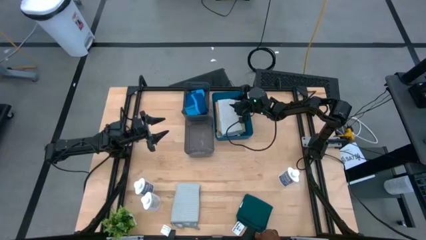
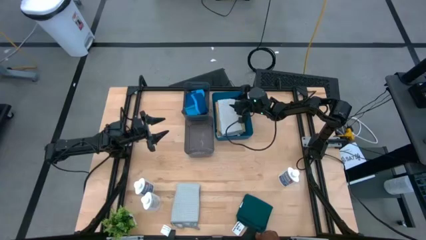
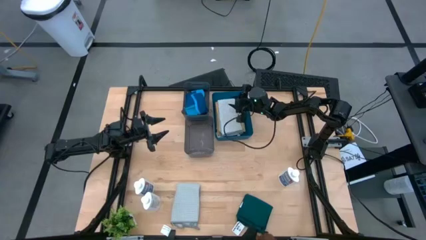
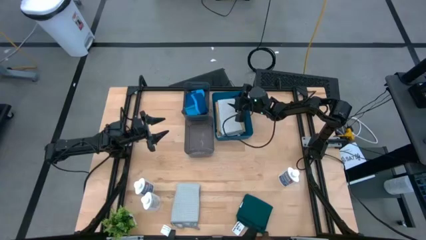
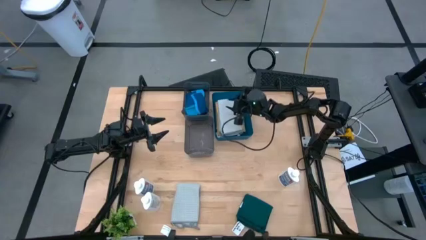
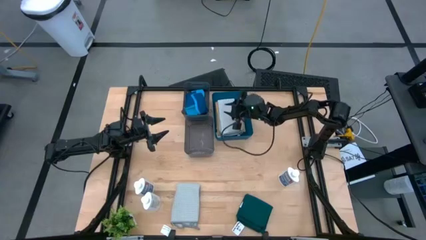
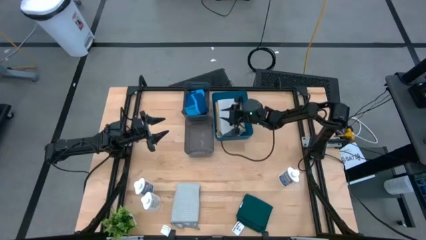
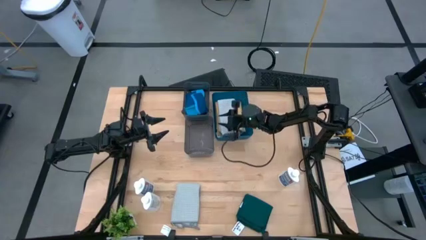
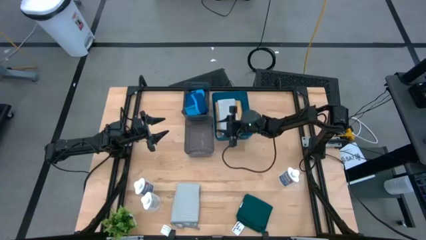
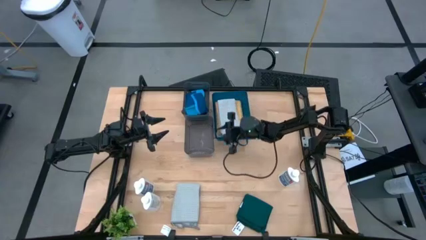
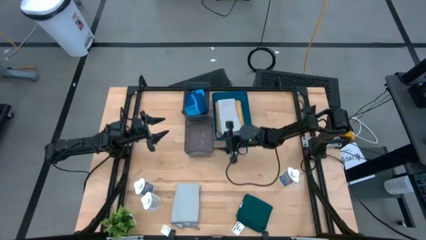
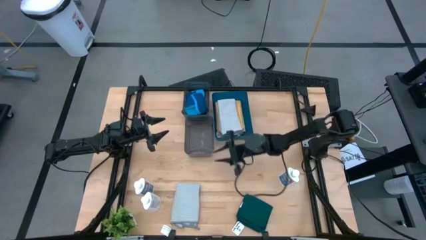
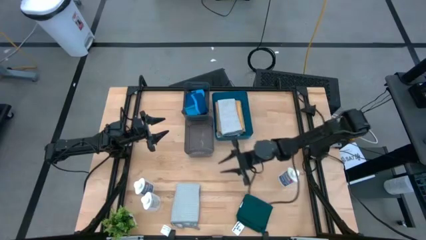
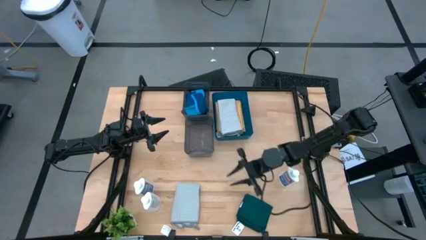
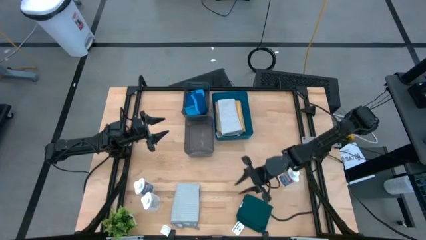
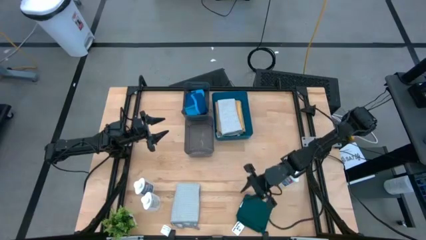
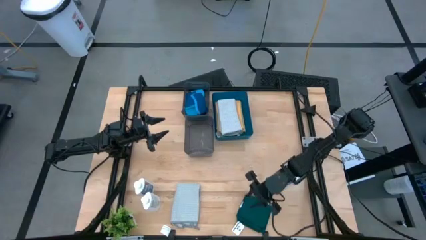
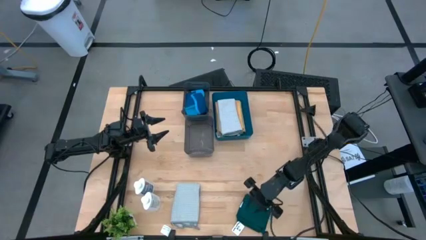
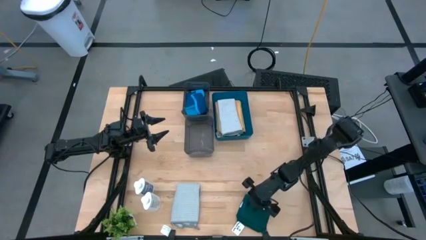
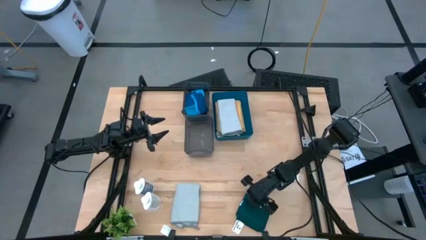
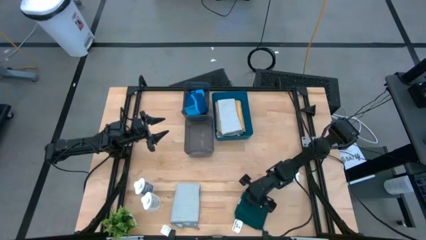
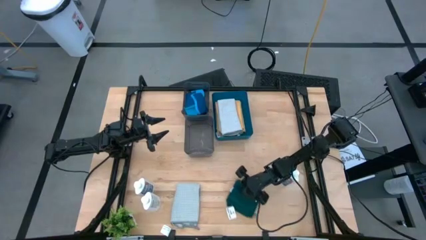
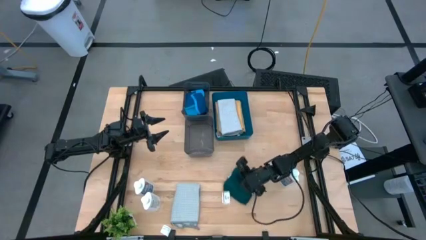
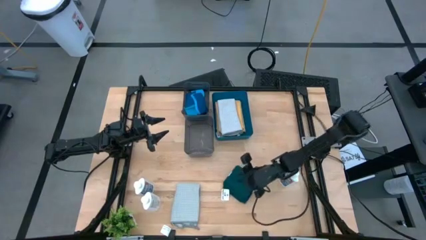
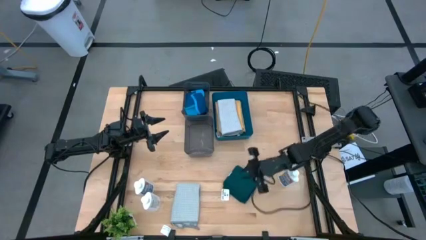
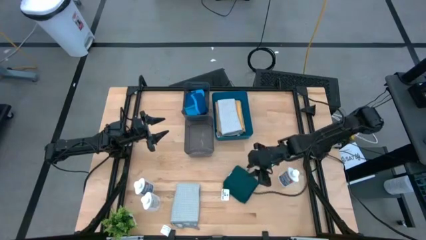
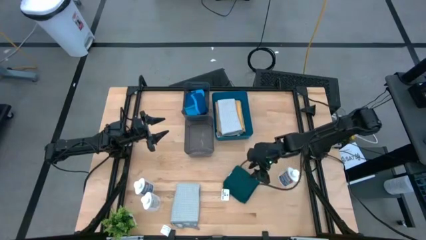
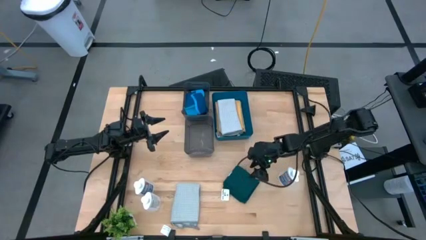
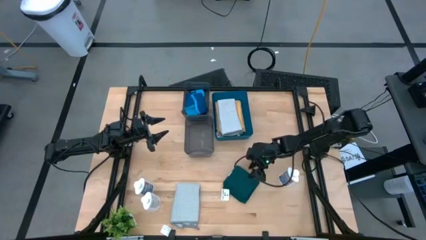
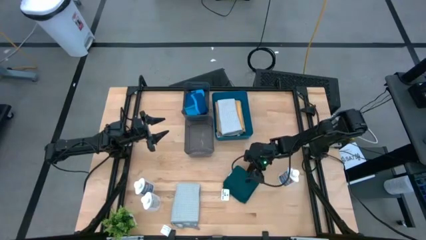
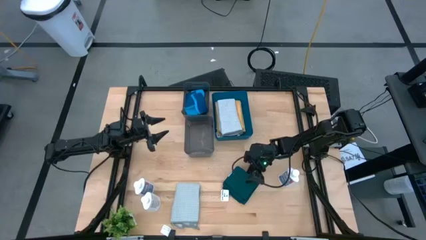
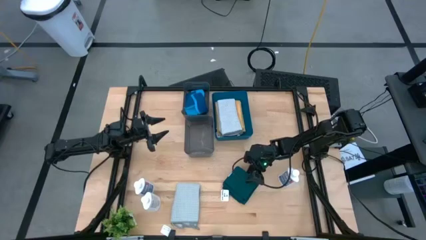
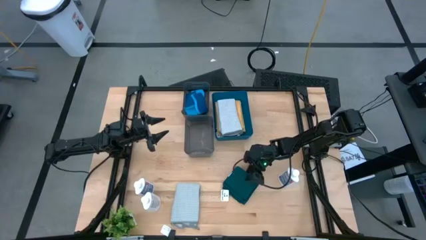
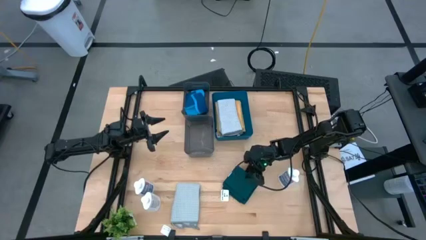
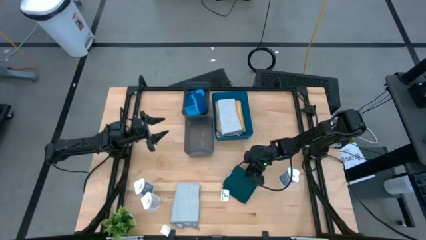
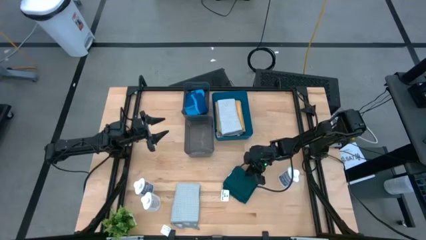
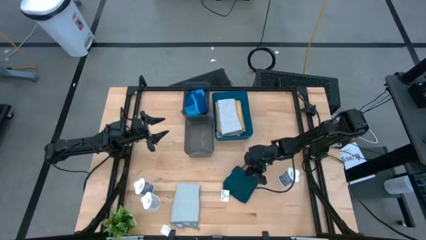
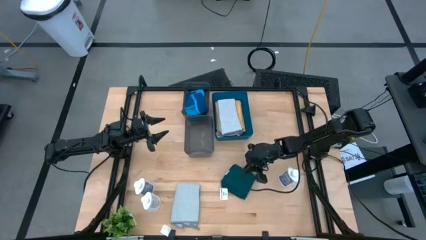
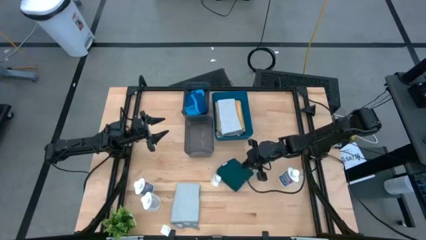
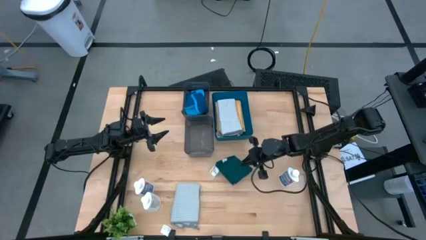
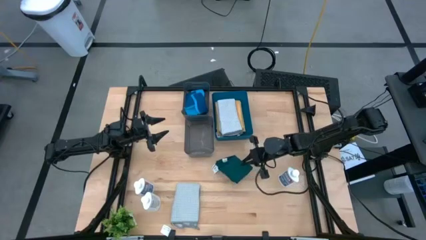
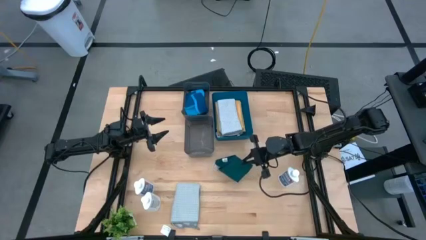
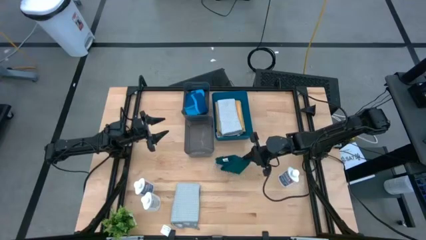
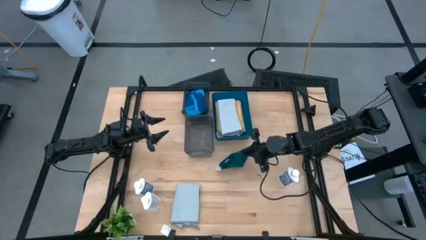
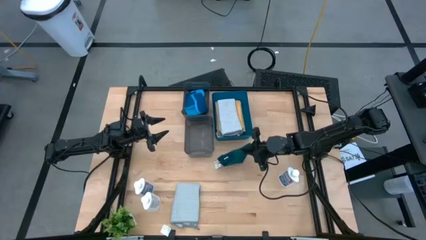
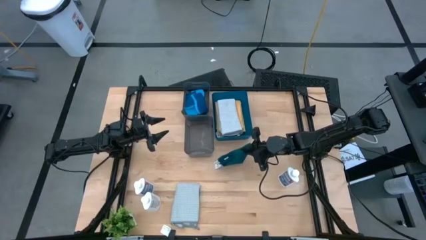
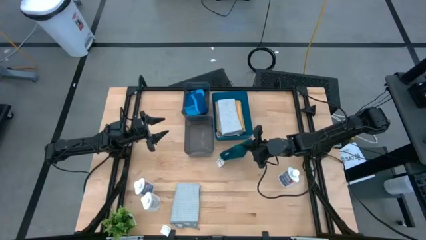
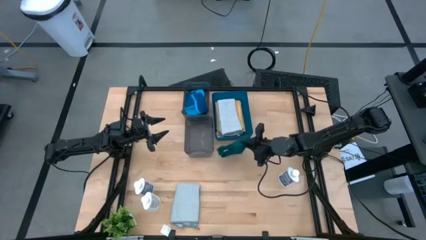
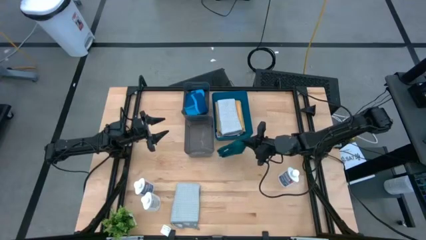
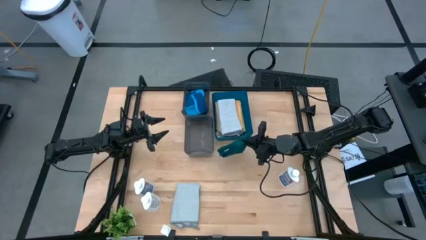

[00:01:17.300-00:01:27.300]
Task: Pick & Place Kitchen Items
Put the green towel into the blue bin
